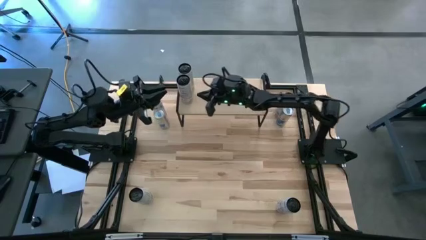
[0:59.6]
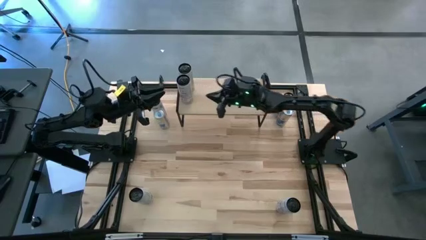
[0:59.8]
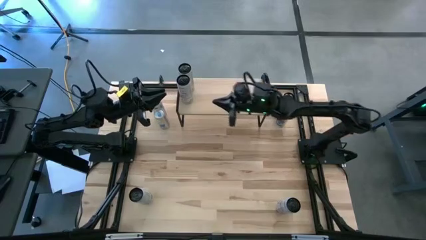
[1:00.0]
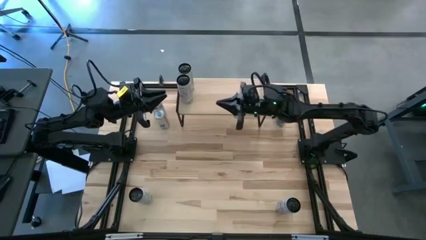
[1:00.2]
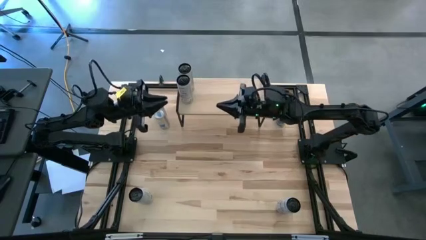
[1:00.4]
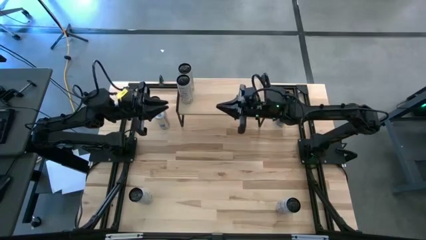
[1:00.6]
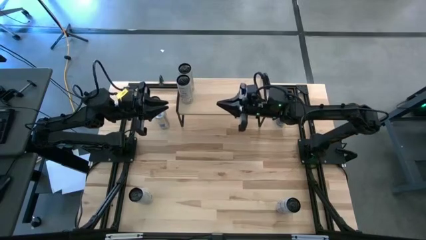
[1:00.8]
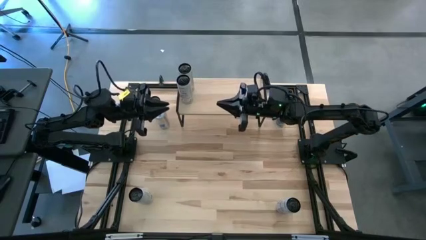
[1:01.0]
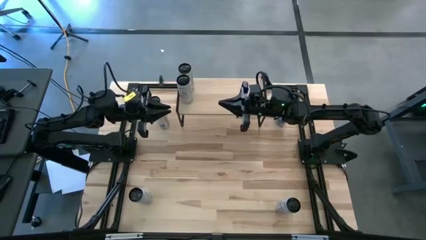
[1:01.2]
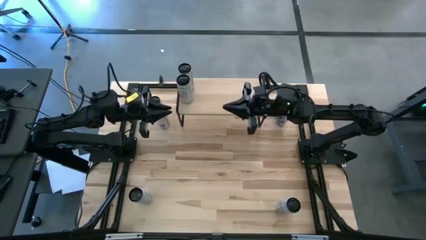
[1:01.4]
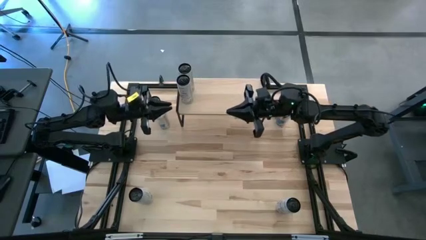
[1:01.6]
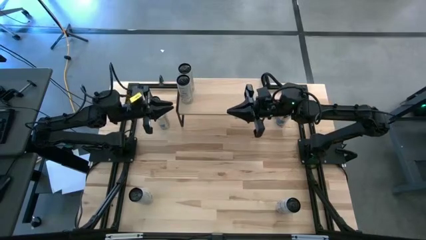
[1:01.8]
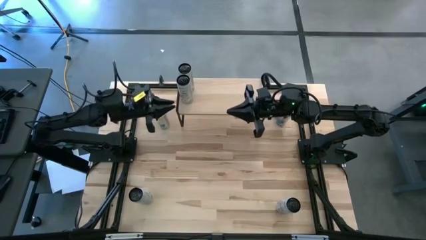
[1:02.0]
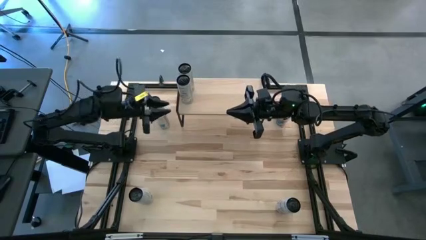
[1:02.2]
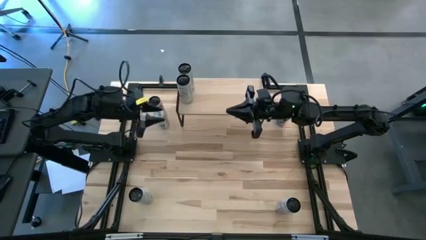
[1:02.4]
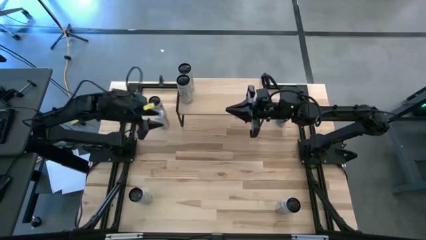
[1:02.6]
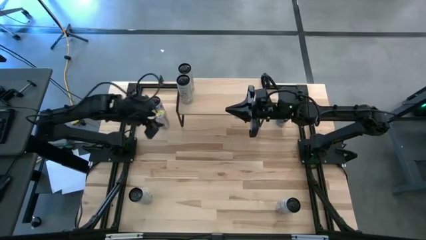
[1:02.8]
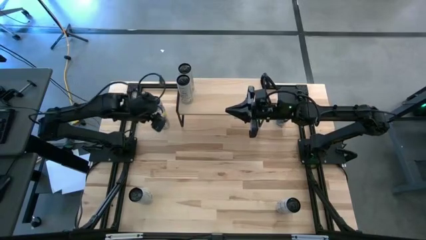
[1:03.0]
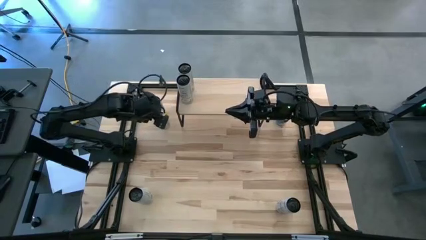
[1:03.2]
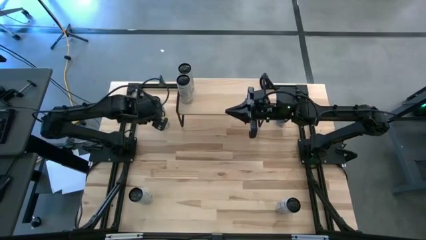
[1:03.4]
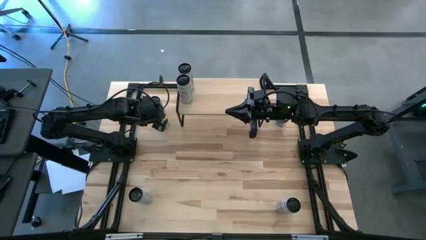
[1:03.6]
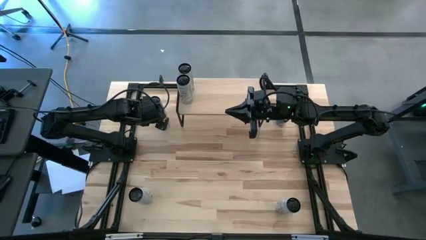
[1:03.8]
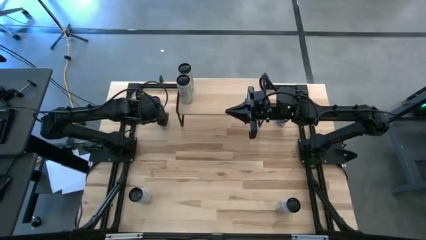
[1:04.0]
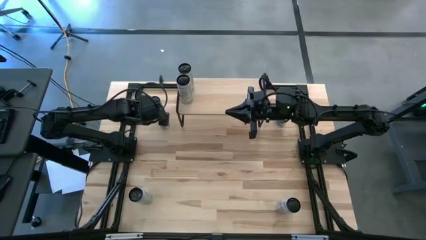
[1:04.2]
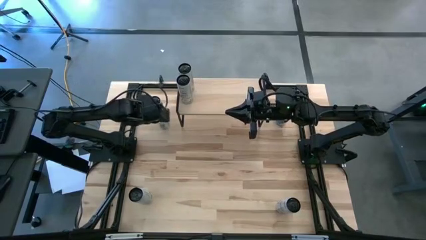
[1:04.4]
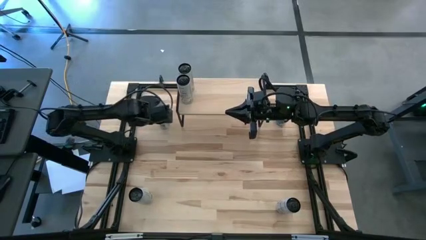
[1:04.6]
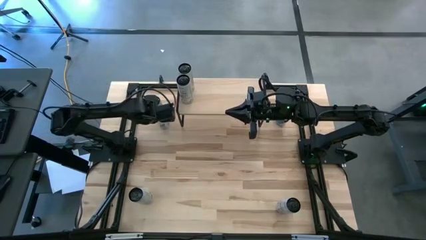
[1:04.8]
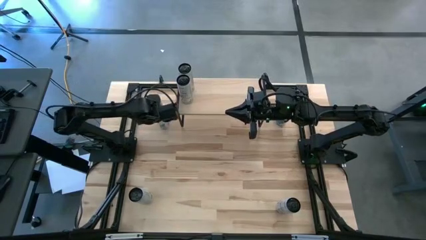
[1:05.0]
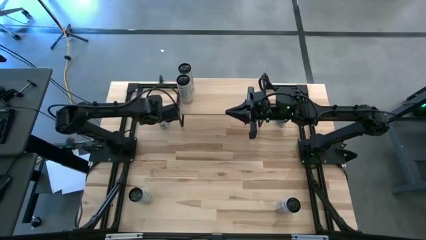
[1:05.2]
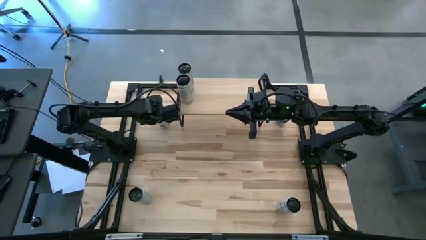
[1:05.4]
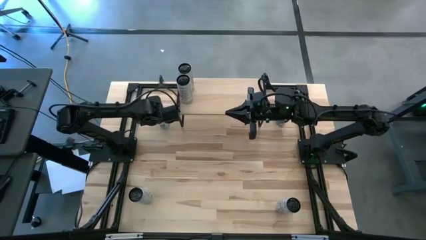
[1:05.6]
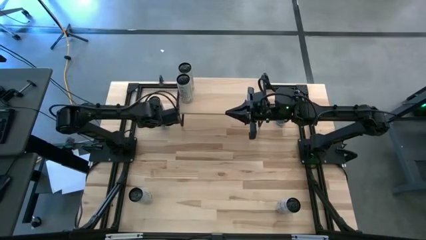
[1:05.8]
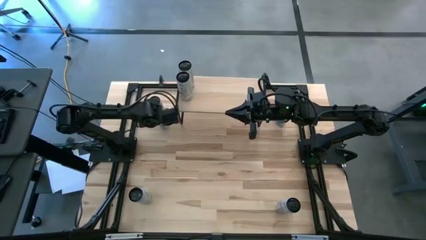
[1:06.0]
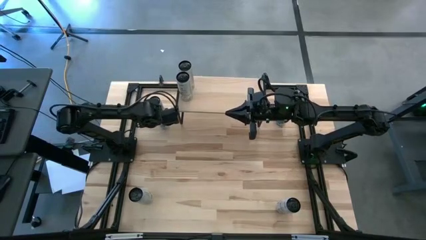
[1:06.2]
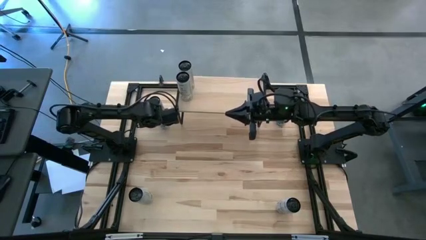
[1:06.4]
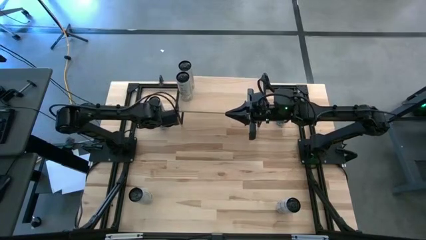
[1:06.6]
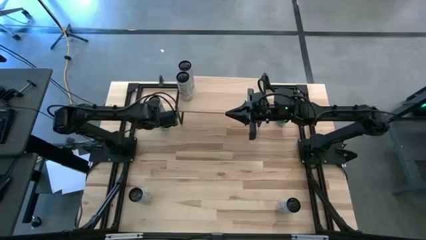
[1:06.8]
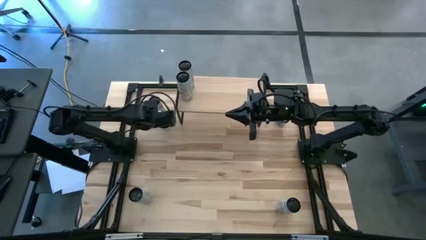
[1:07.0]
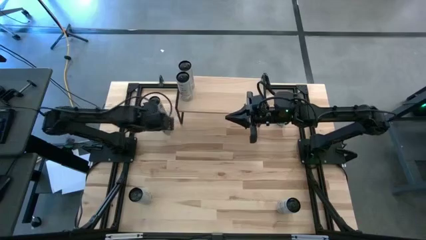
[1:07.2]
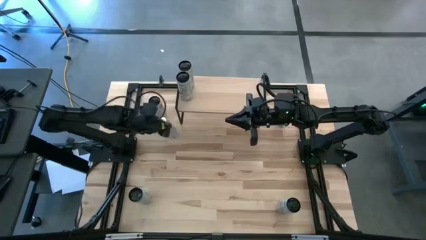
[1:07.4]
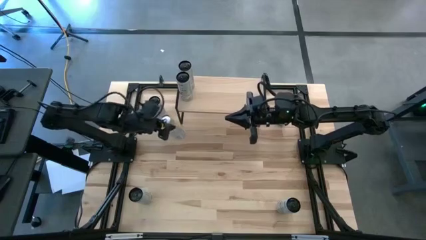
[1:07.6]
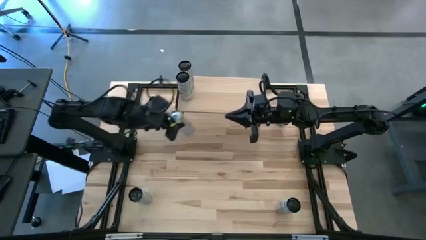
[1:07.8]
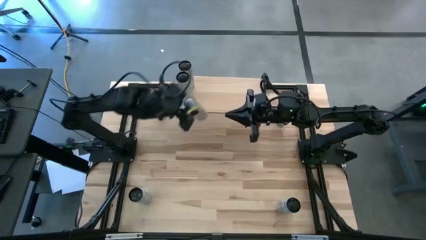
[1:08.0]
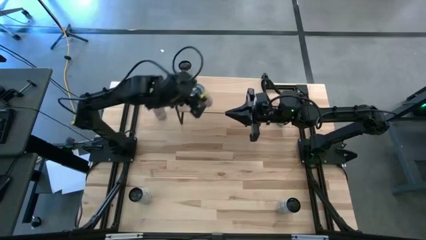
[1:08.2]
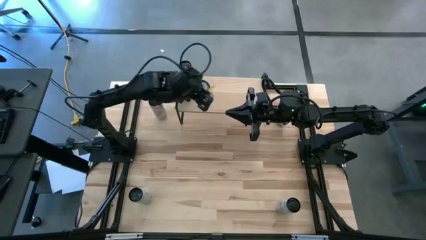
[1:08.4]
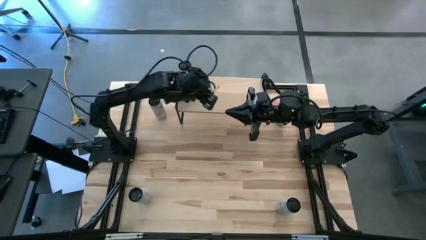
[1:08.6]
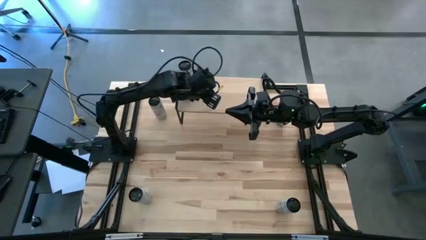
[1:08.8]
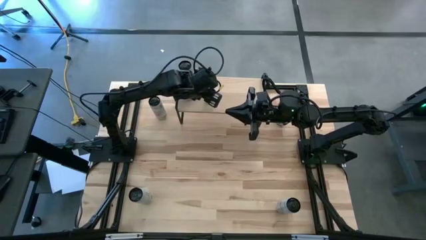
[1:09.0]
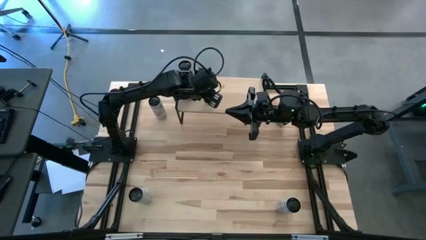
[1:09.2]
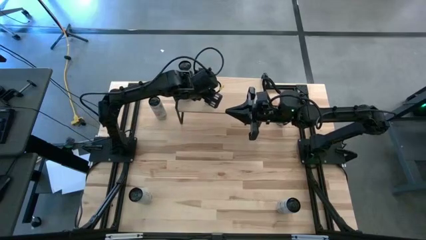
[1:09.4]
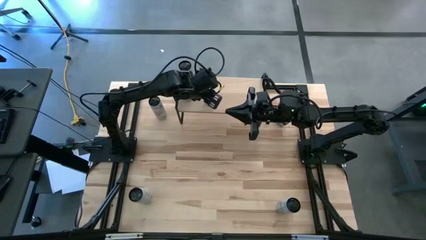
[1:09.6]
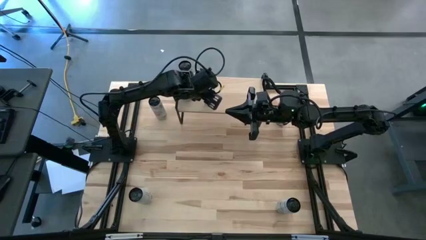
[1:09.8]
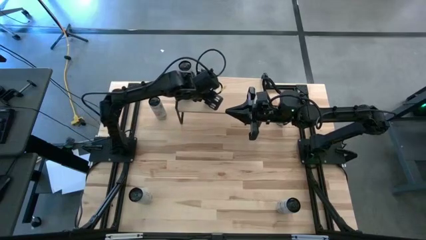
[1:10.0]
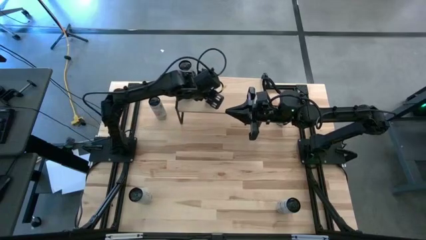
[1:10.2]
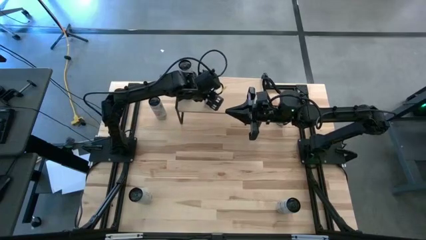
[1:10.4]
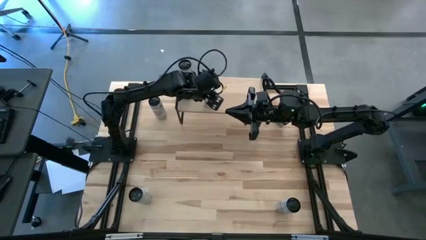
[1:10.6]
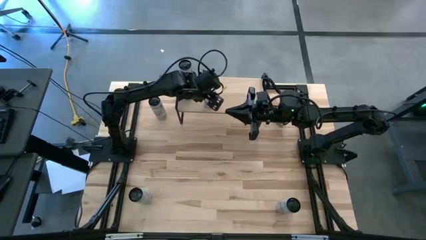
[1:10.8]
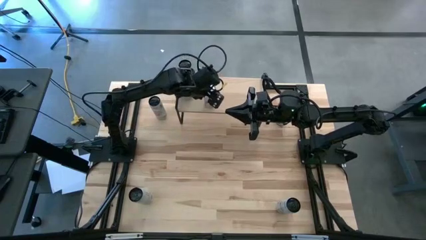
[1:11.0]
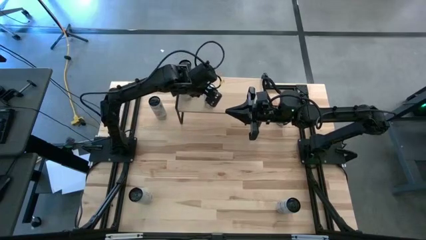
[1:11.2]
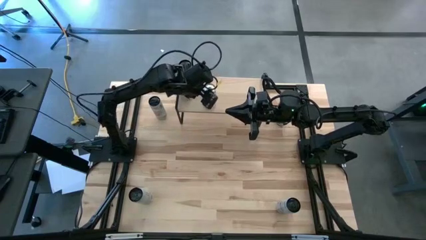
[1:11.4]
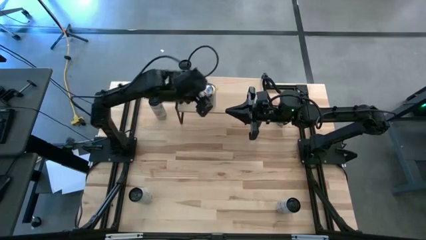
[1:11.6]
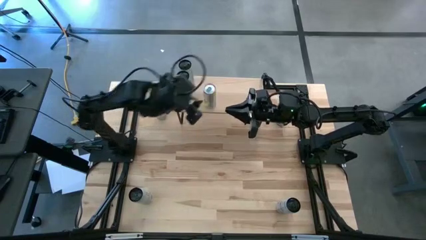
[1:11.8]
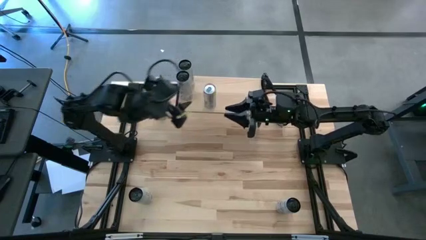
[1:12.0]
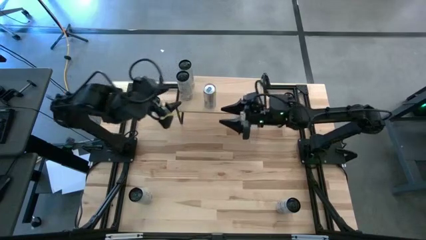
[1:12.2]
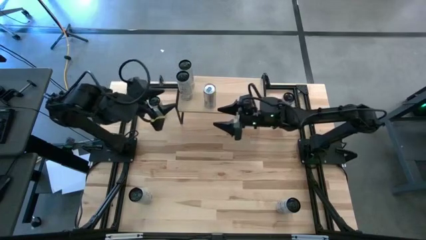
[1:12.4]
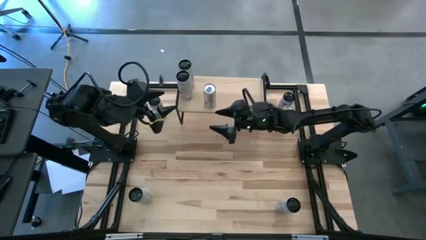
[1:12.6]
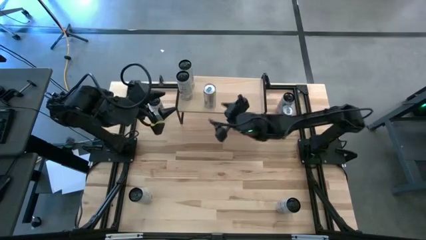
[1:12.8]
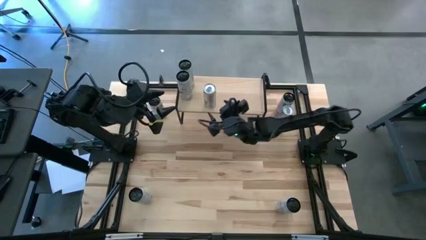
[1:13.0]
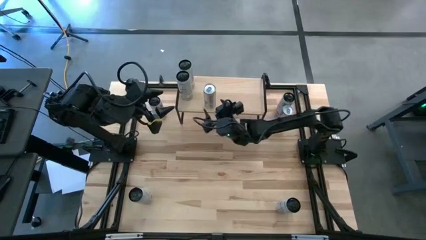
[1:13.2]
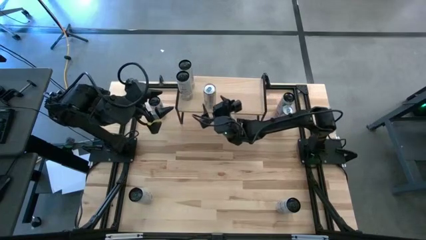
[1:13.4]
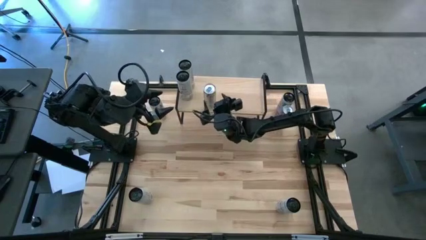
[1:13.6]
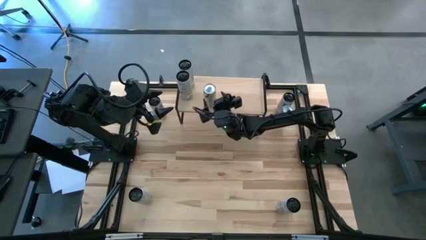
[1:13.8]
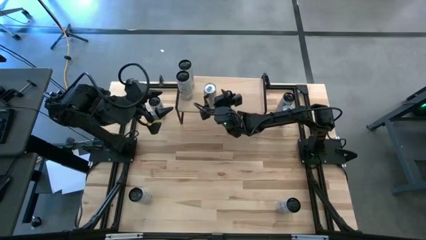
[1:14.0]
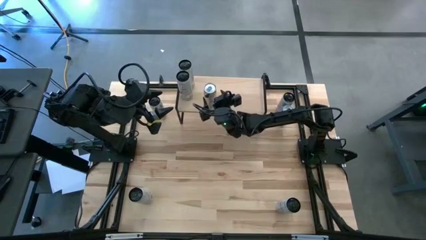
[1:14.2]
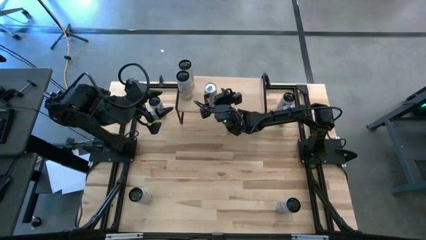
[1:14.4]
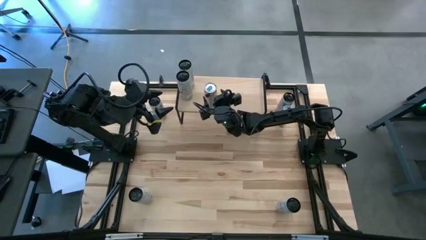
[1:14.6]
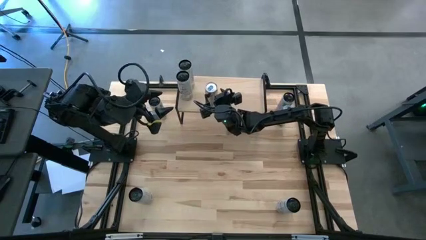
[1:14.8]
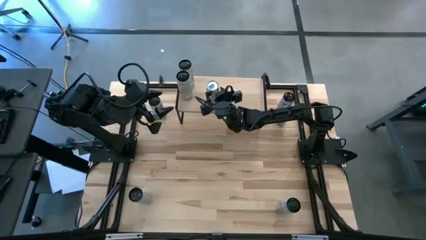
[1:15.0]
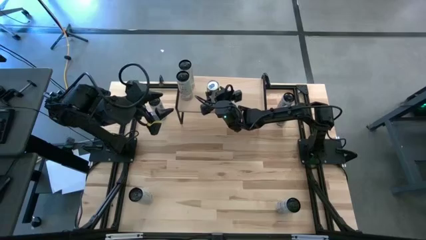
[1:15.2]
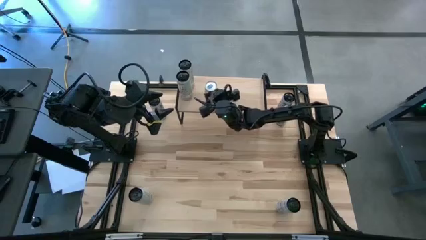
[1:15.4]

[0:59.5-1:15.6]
Task: Place canned beverage on shelf
Put the left blue soda can on the shelf
